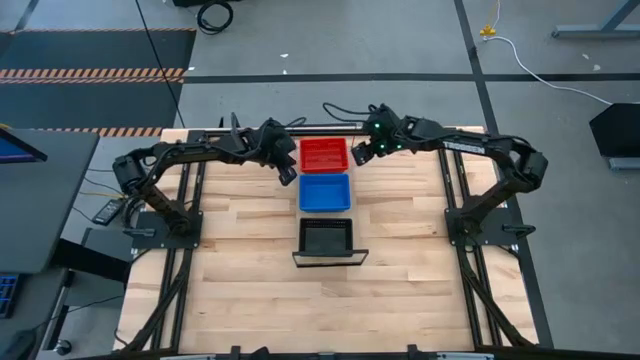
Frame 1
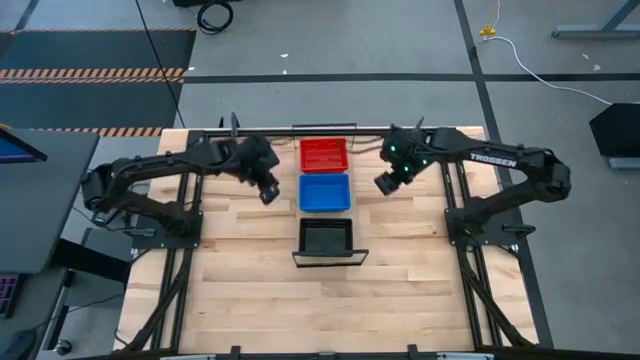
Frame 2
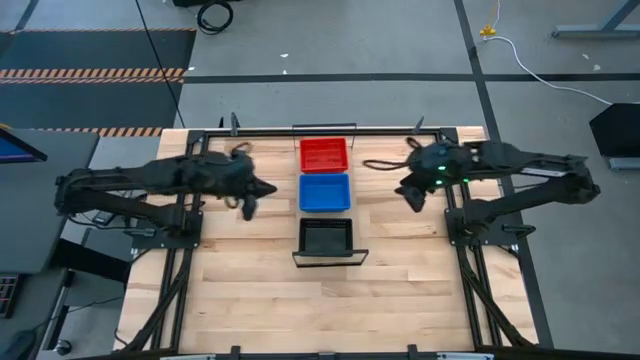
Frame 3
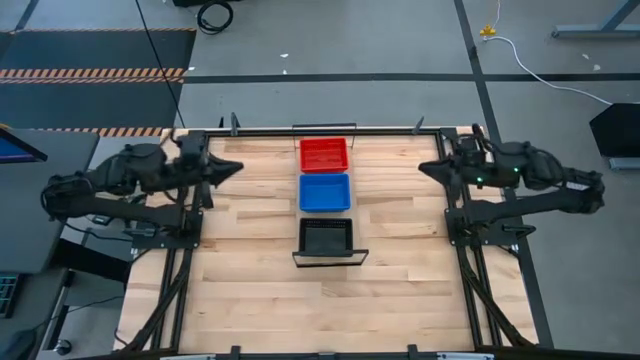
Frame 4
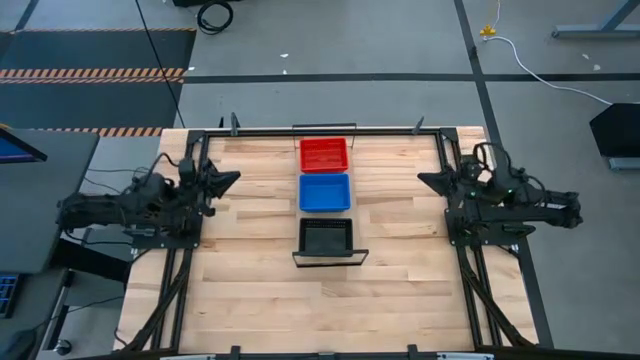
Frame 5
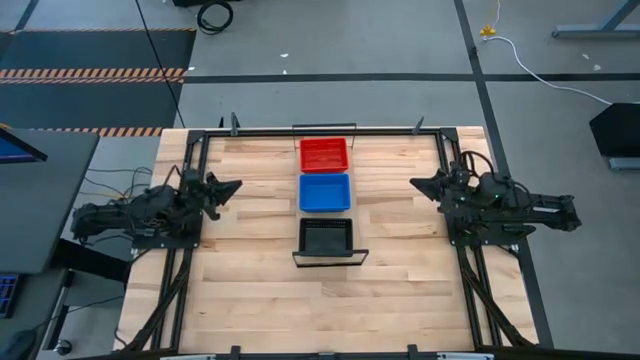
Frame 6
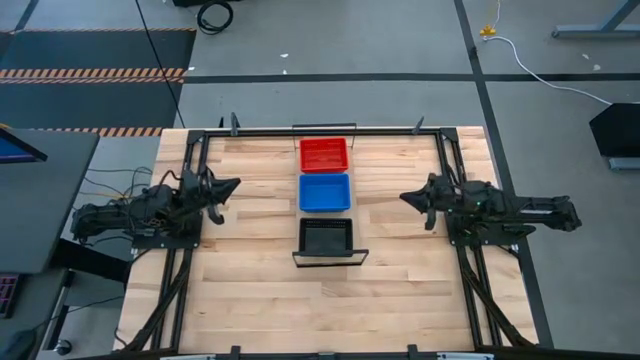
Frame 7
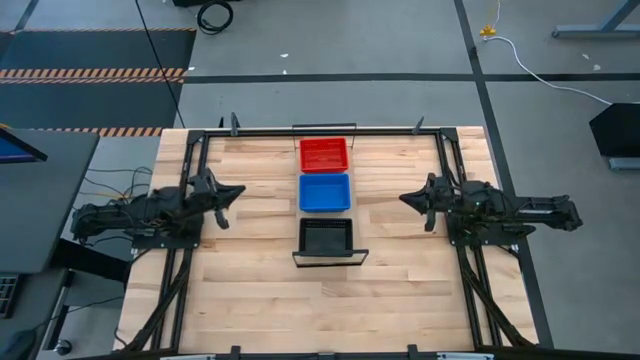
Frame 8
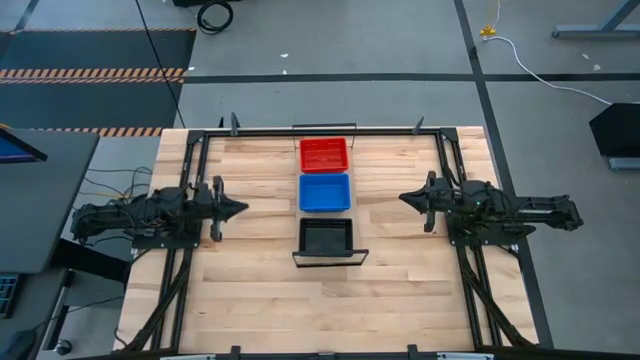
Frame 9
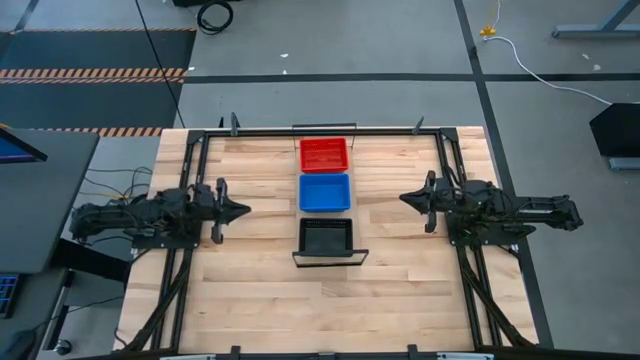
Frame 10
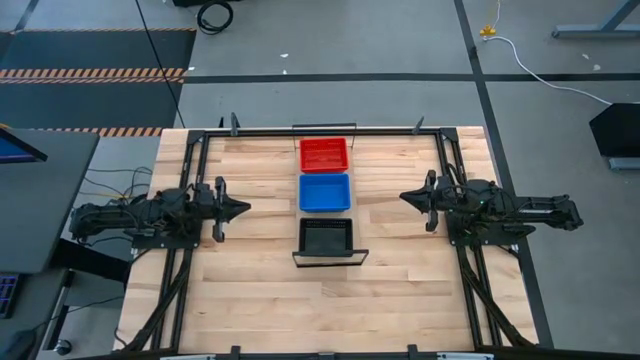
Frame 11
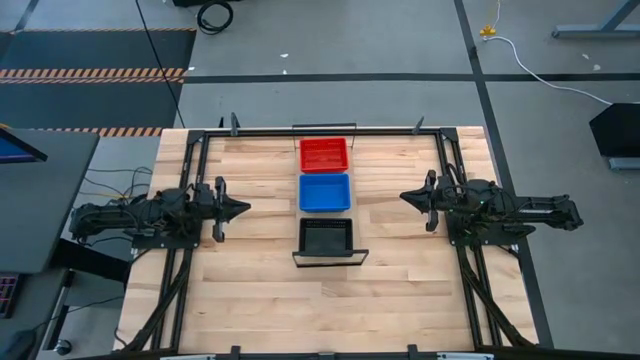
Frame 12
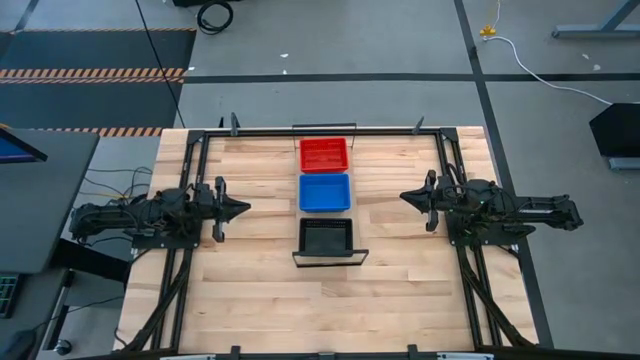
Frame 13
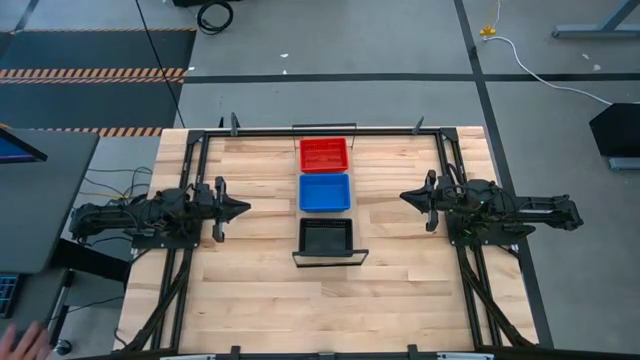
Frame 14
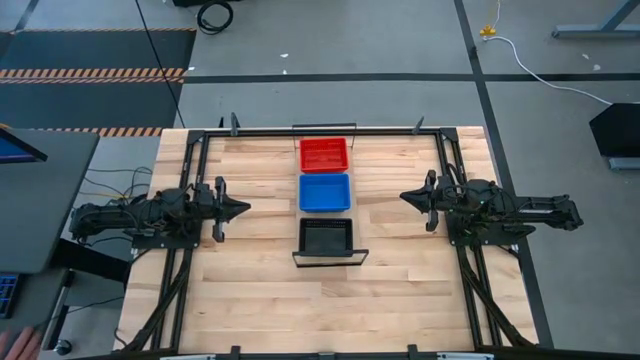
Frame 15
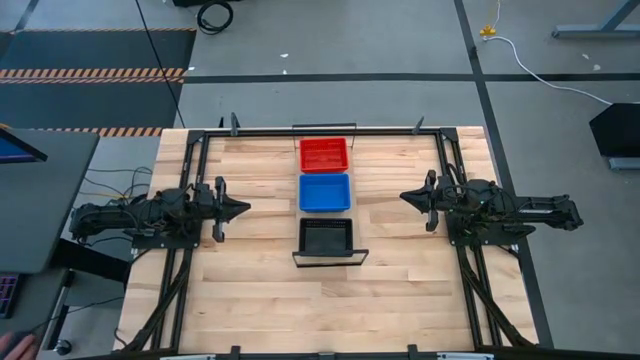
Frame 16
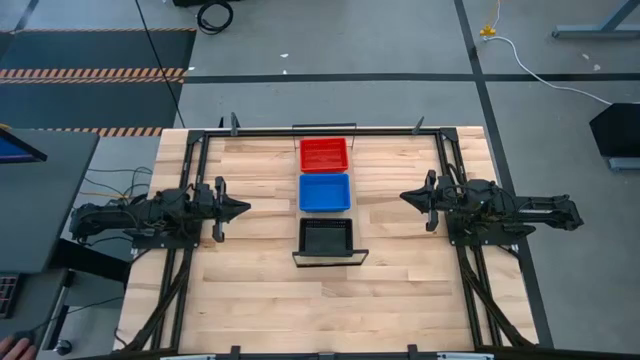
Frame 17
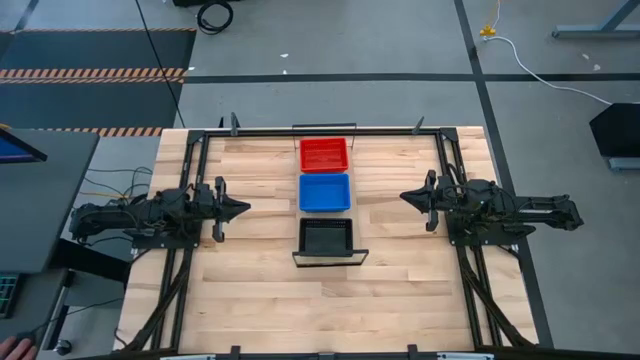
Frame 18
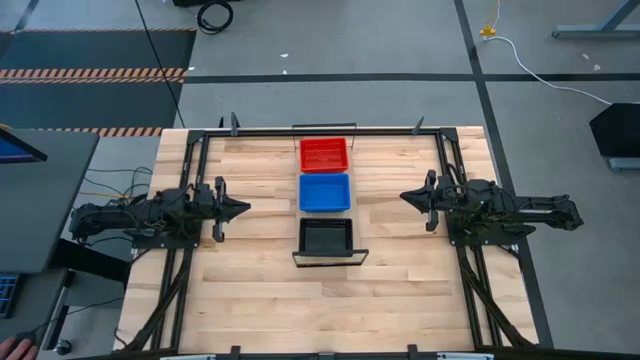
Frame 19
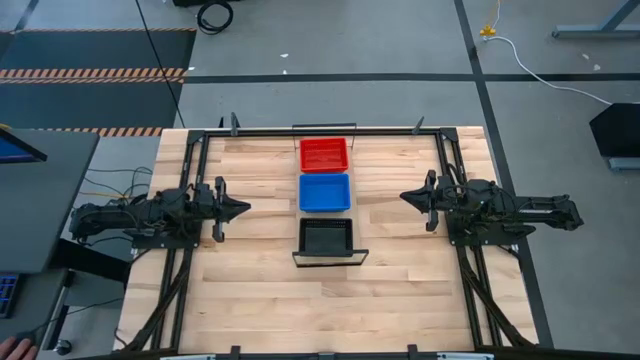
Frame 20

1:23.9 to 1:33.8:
Task: Stack baskets on shelf by color
Return to Home Position

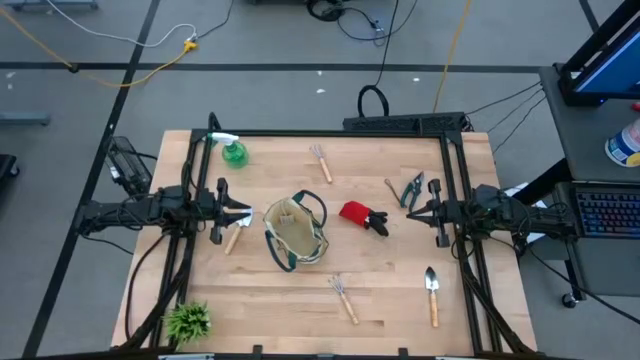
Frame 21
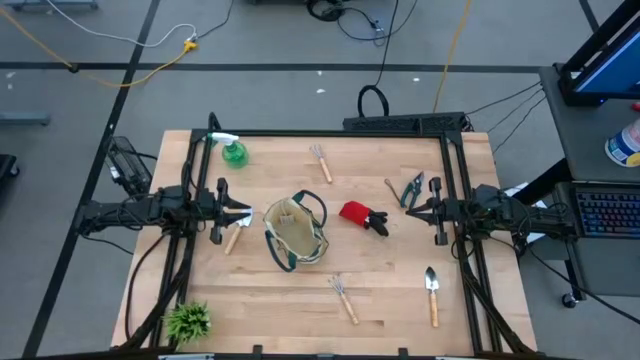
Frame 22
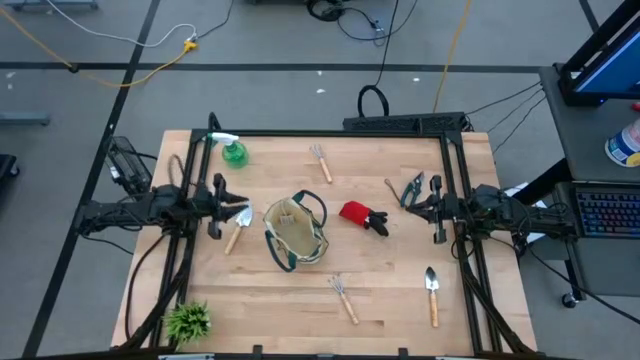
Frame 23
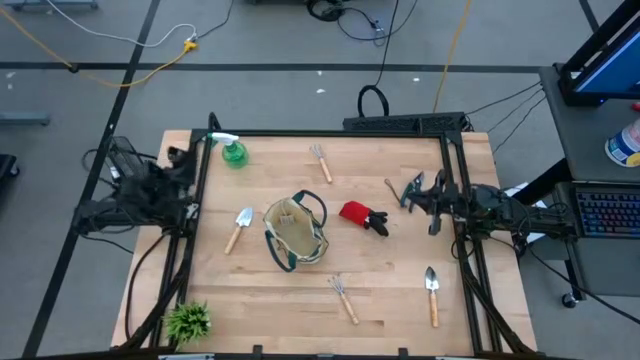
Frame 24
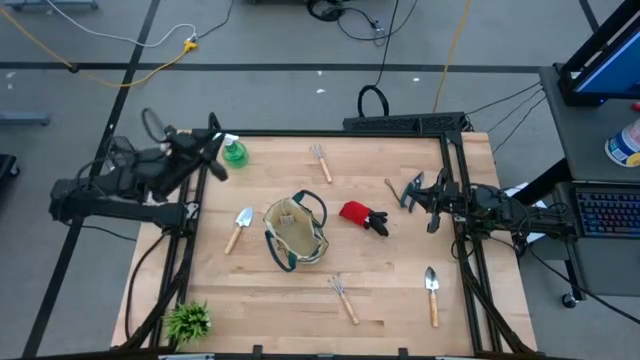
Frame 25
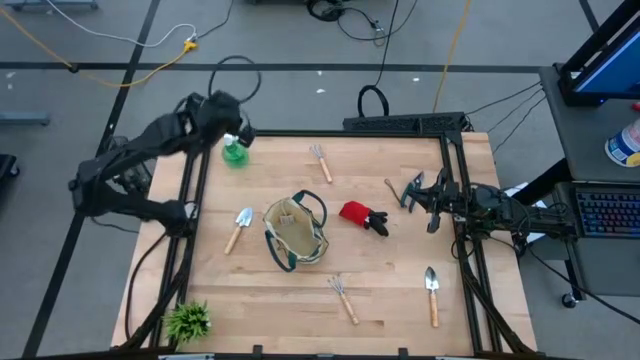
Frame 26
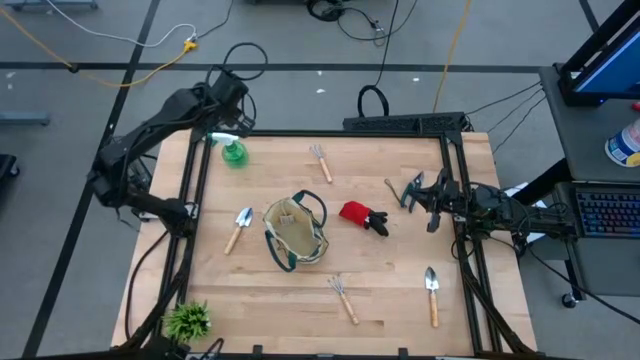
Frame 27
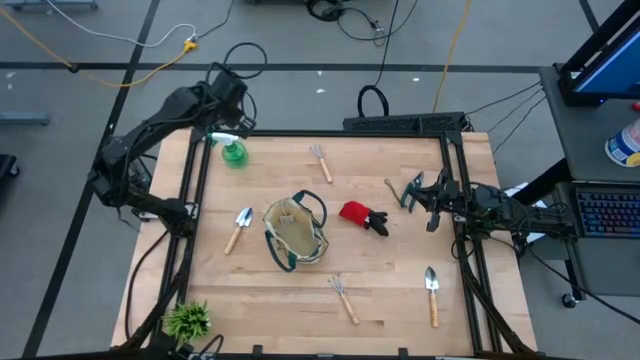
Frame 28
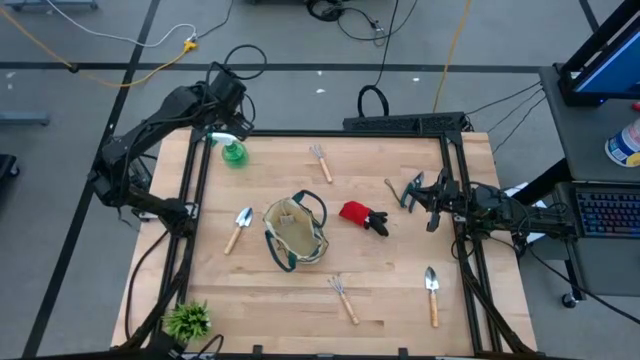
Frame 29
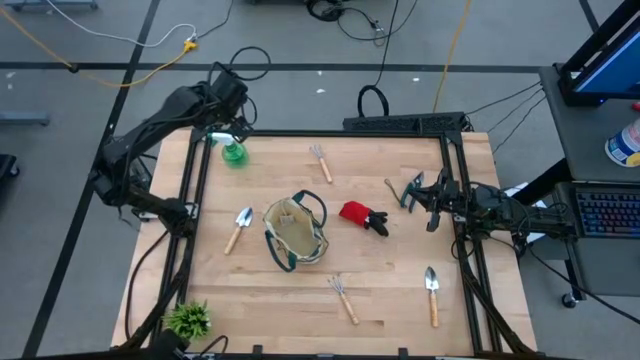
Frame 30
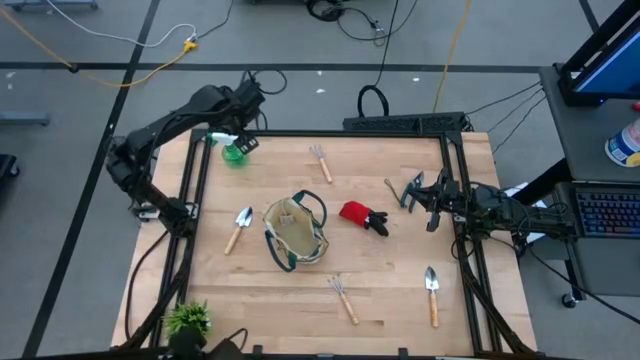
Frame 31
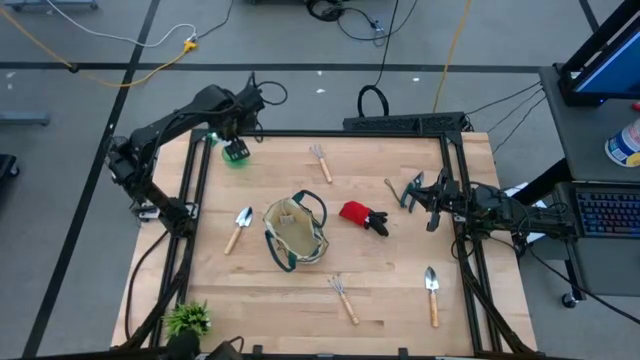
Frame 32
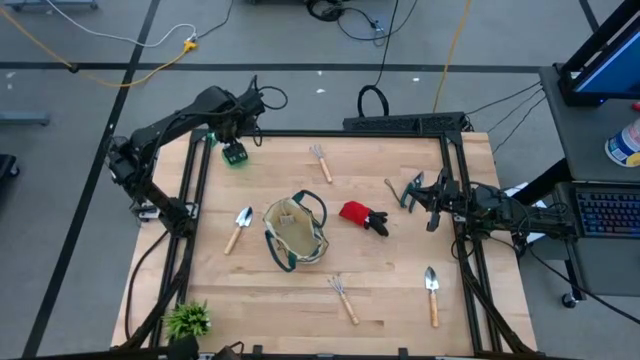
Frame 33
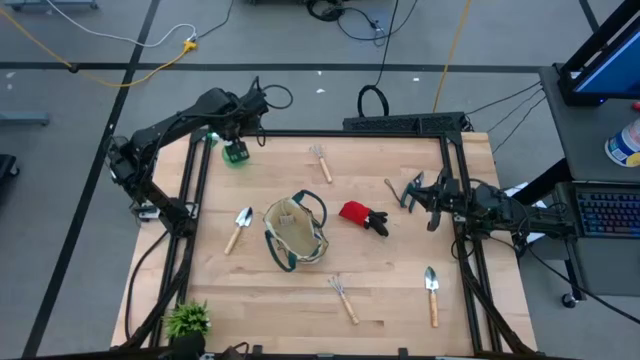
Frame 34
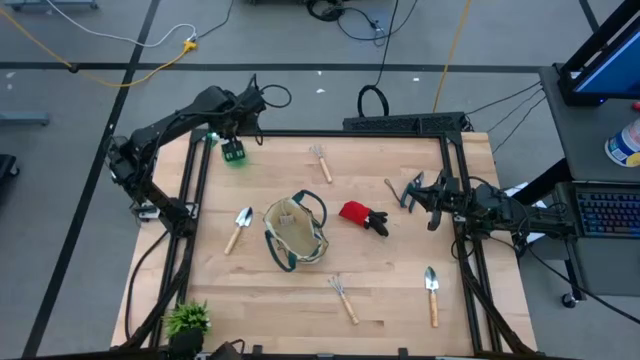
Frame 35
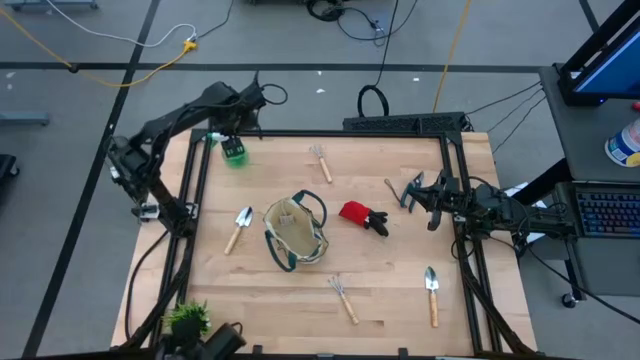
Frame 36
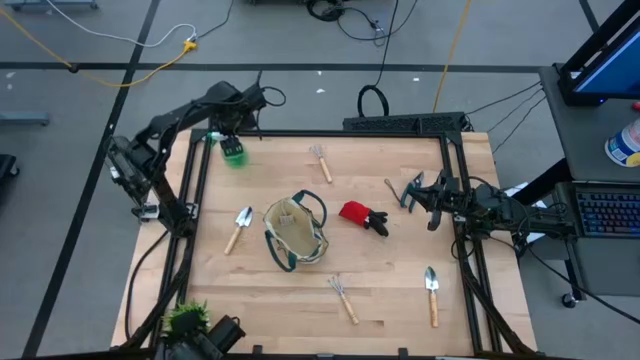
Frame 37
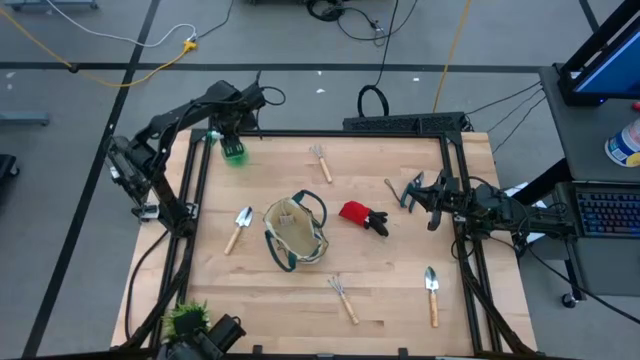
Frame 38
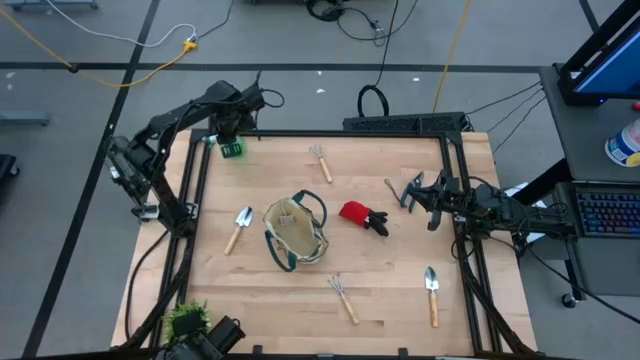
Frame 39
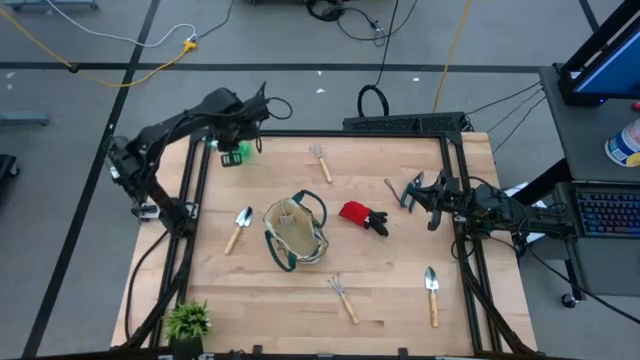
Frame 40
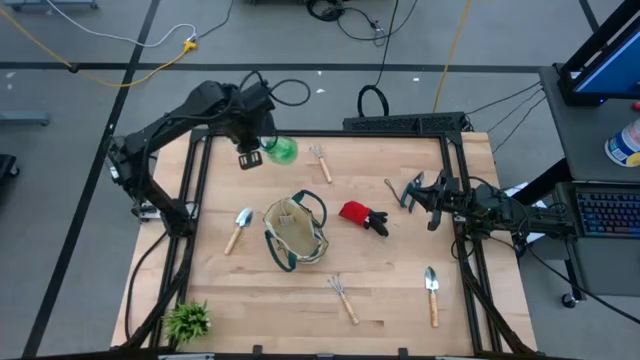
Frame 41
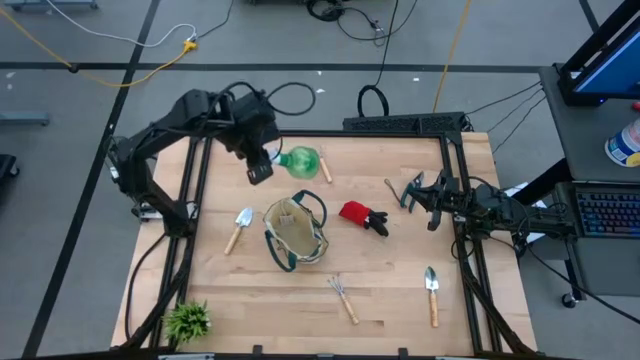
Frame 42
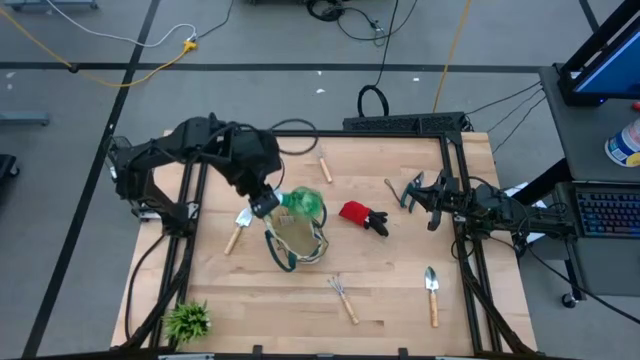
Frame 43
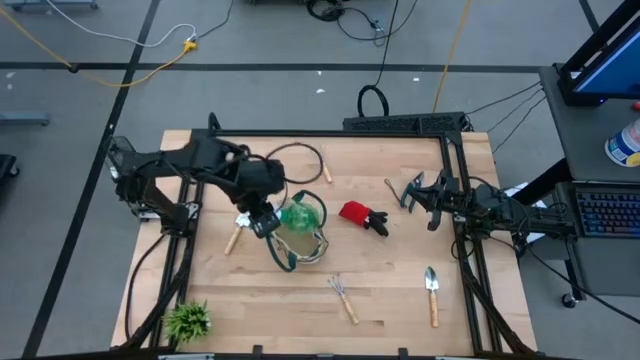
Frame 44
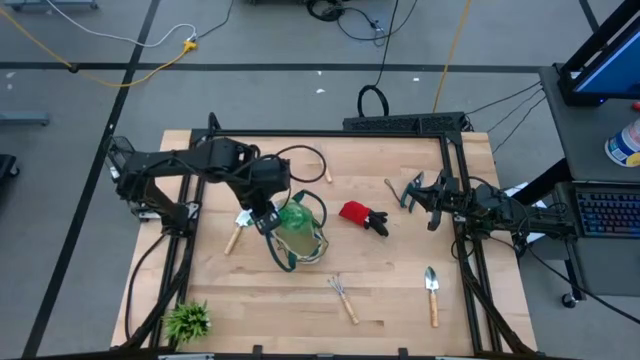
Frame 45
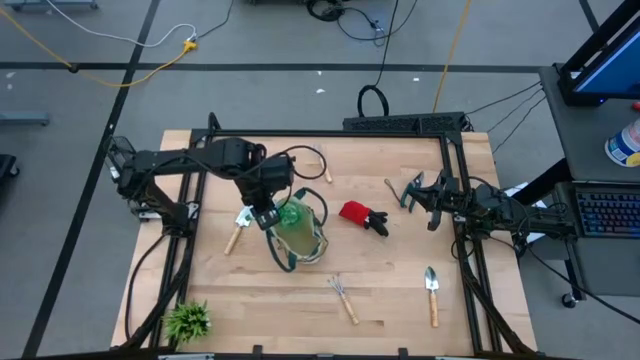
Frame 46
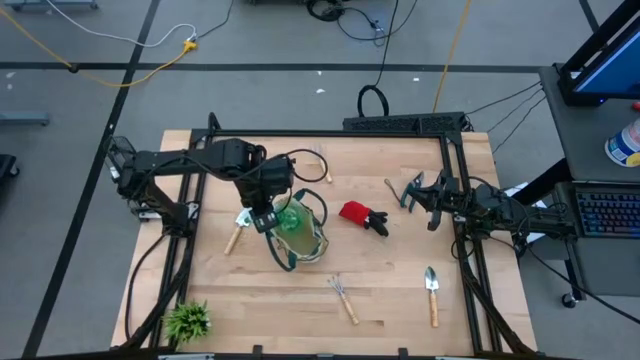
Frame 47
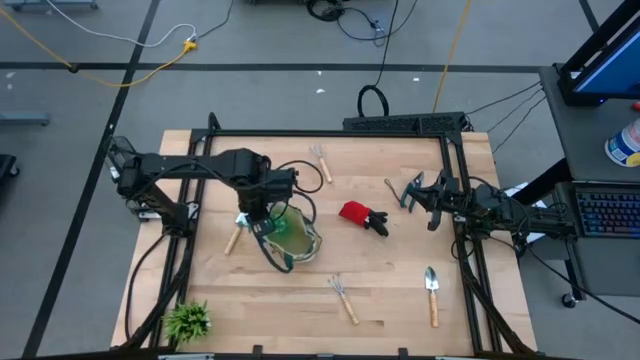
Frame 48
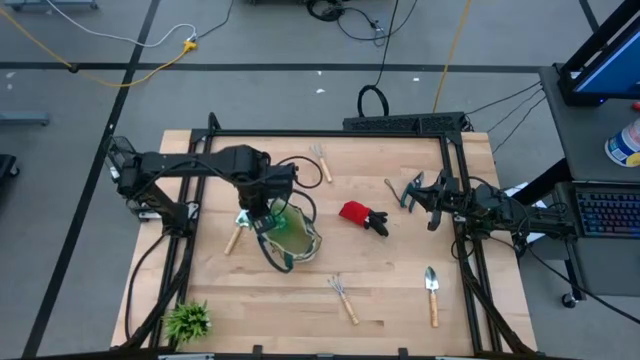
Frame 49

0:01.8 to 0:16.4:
Task: Pick & Place Garden tools in Gardening bag
Put the spray bottle into the gardening bag
